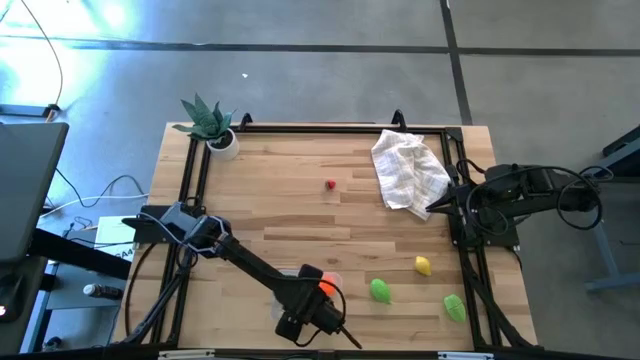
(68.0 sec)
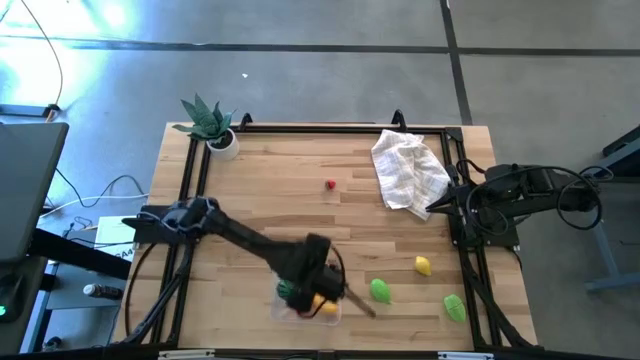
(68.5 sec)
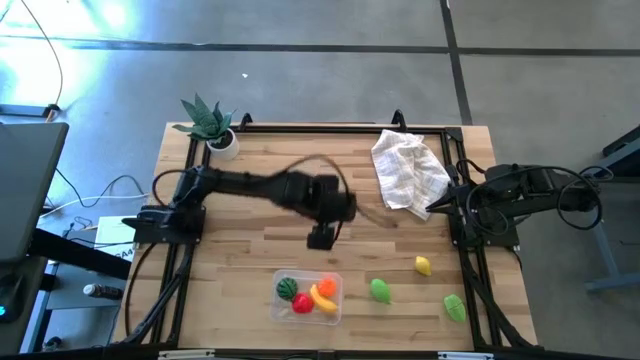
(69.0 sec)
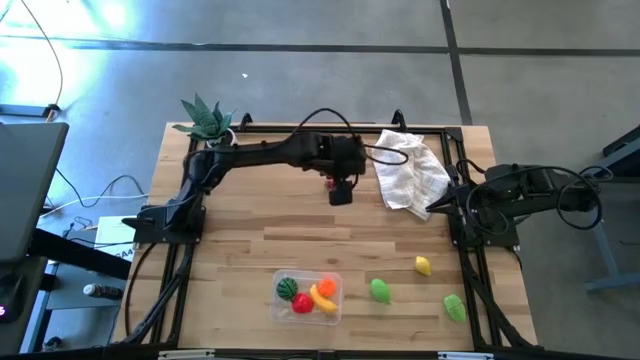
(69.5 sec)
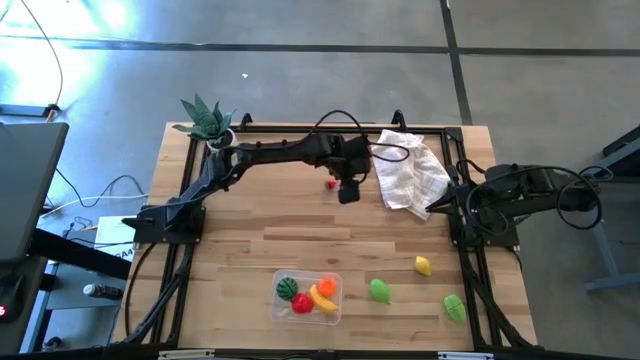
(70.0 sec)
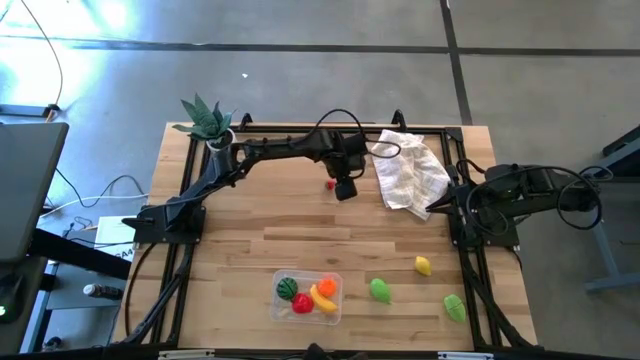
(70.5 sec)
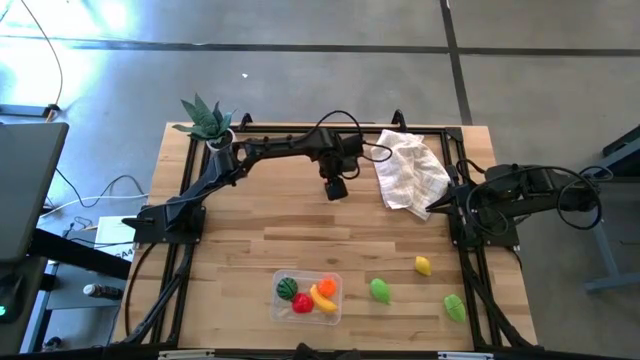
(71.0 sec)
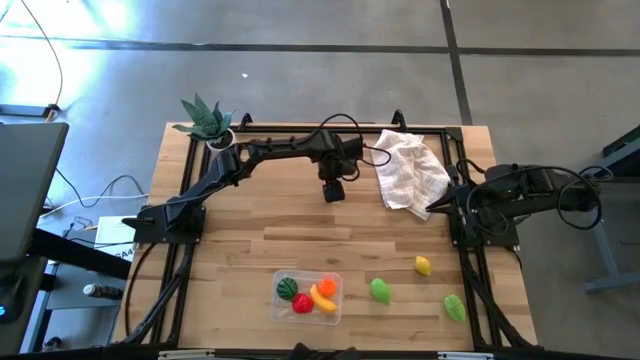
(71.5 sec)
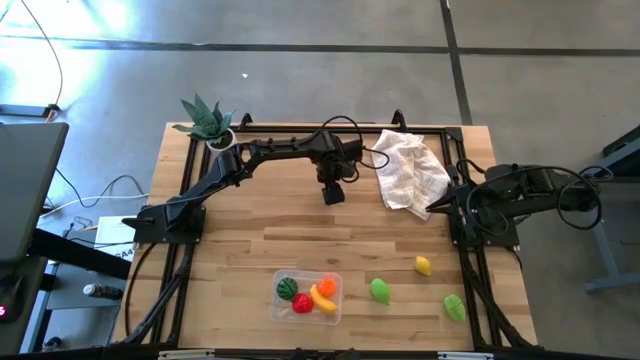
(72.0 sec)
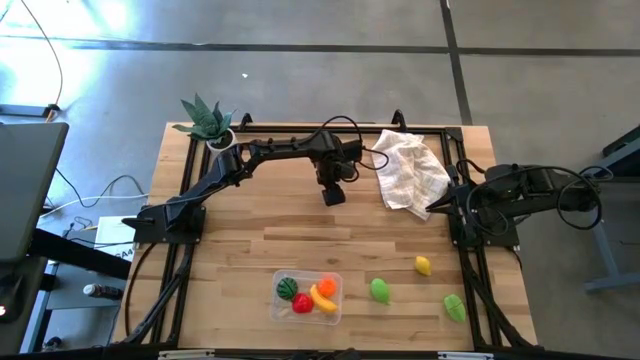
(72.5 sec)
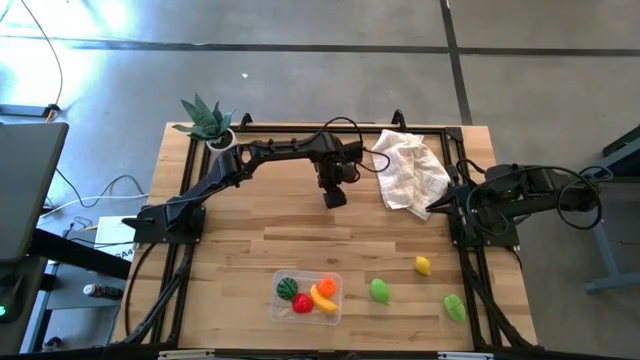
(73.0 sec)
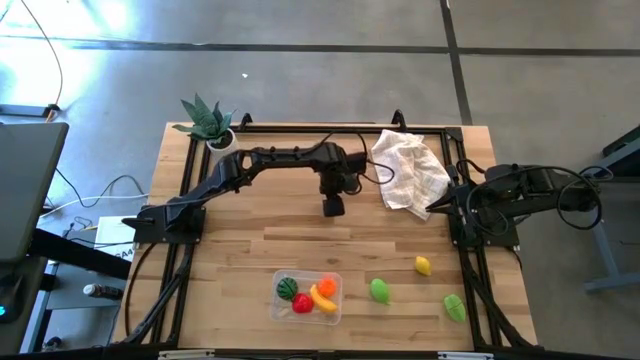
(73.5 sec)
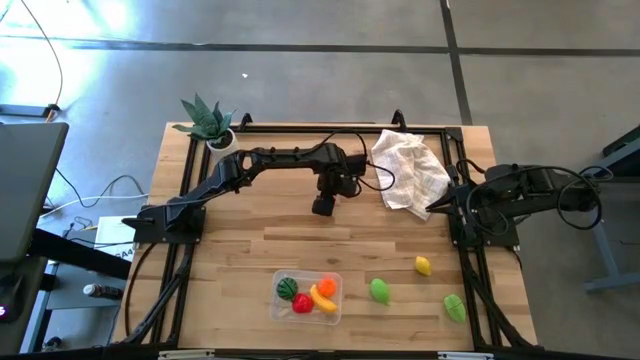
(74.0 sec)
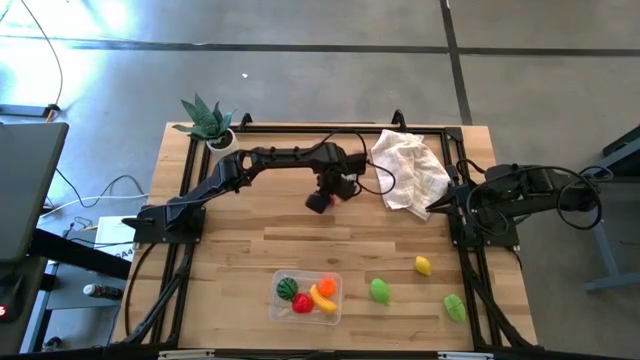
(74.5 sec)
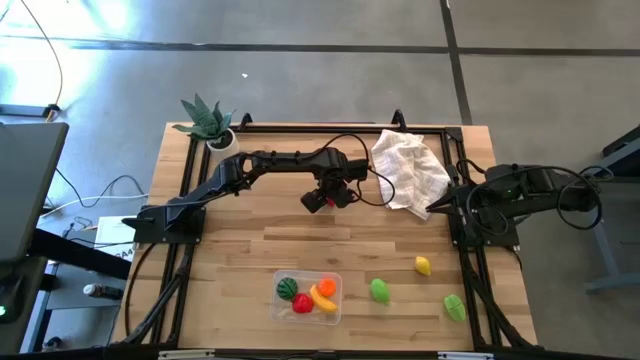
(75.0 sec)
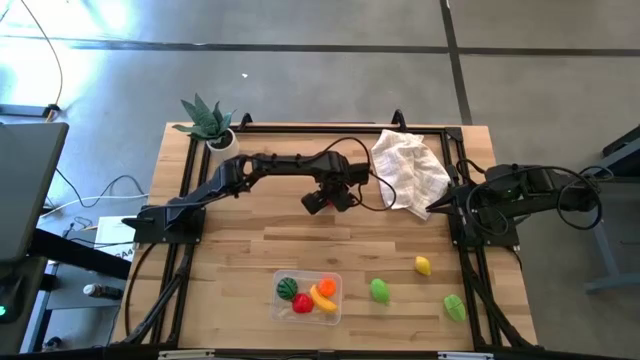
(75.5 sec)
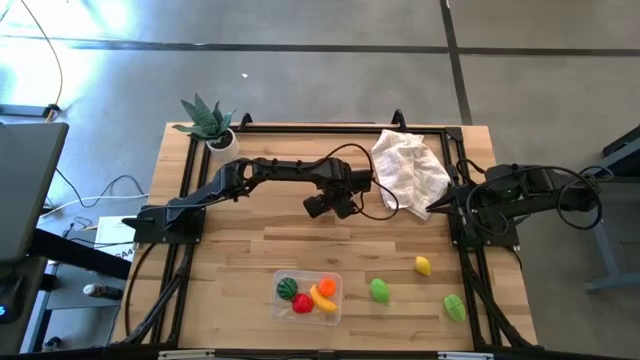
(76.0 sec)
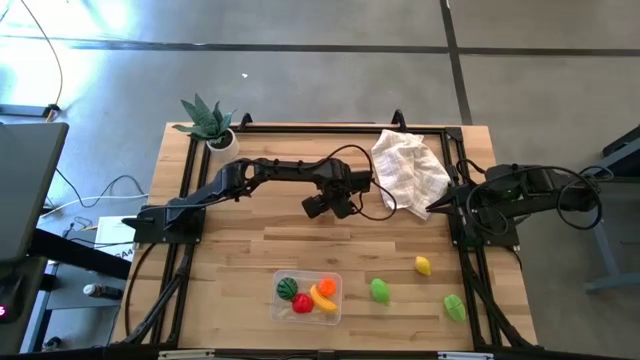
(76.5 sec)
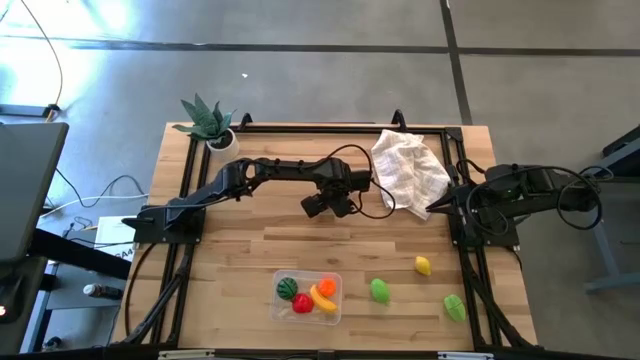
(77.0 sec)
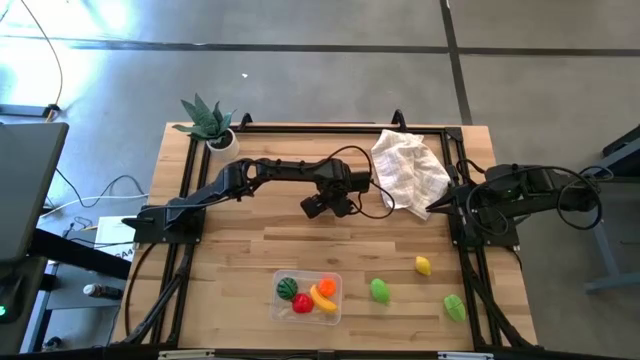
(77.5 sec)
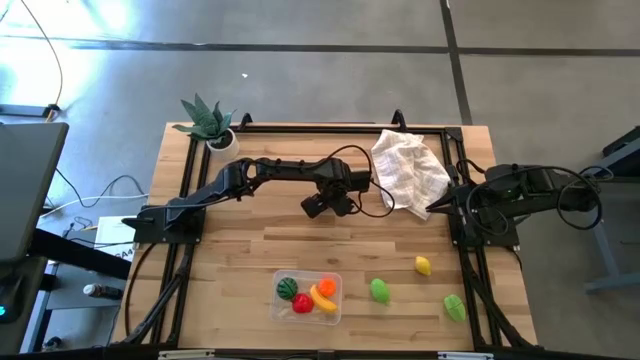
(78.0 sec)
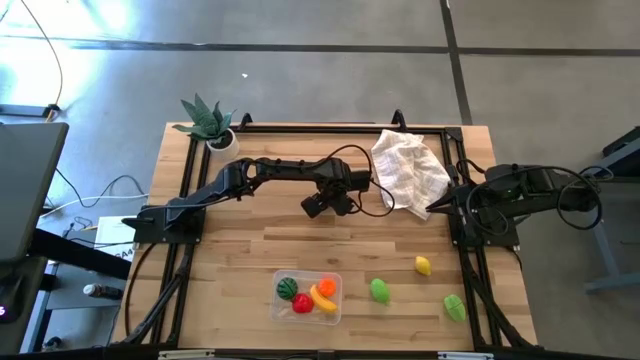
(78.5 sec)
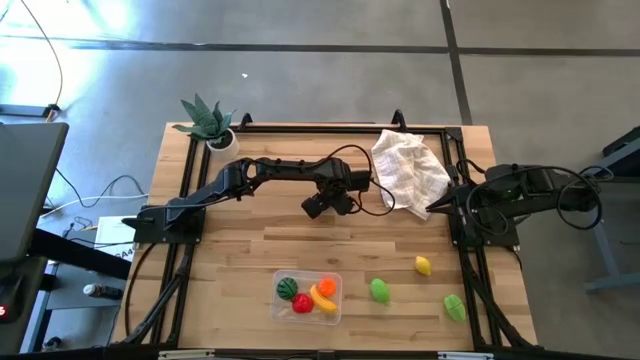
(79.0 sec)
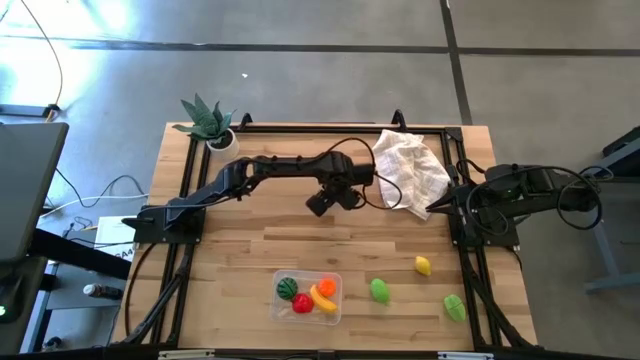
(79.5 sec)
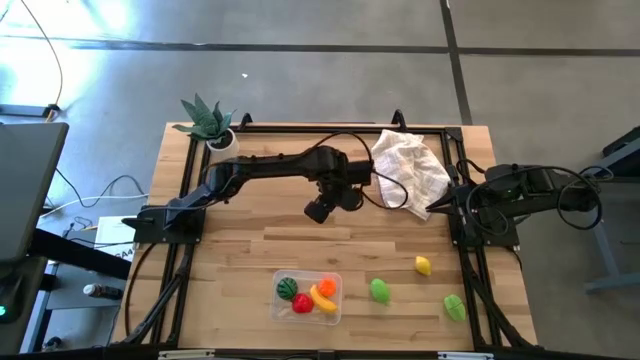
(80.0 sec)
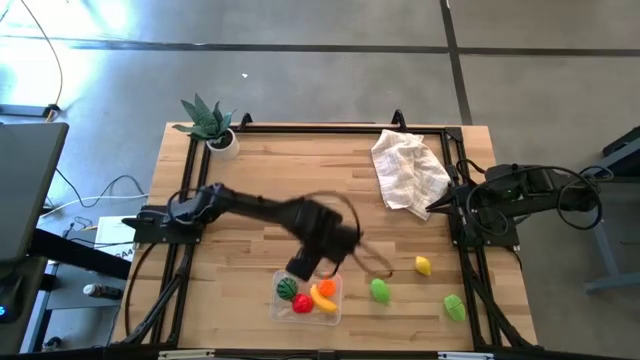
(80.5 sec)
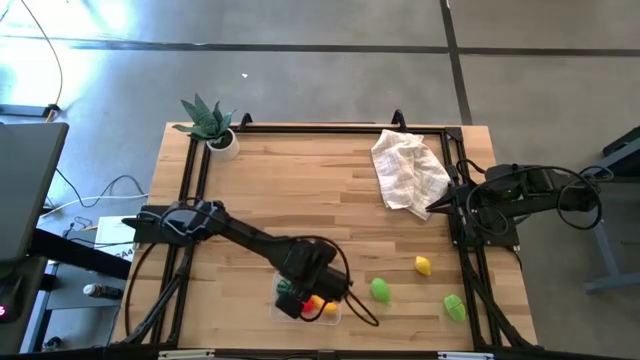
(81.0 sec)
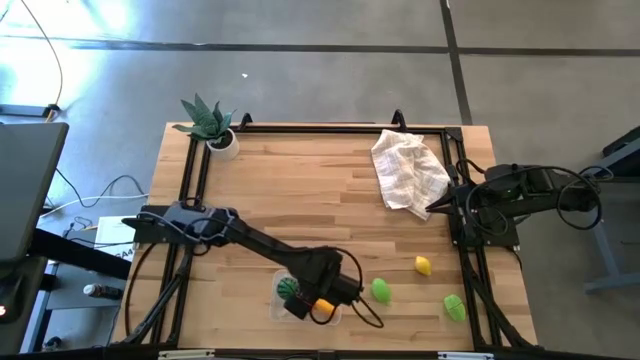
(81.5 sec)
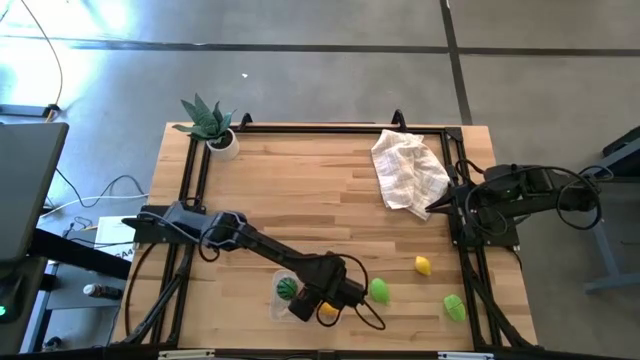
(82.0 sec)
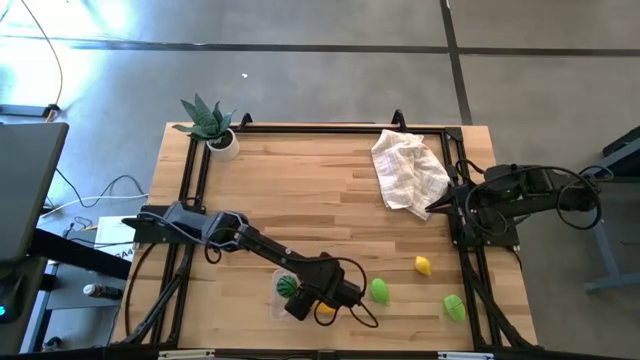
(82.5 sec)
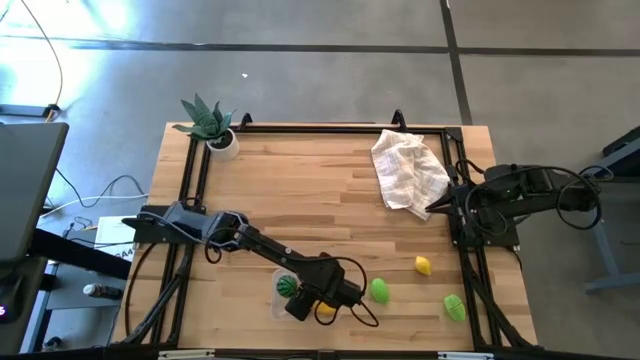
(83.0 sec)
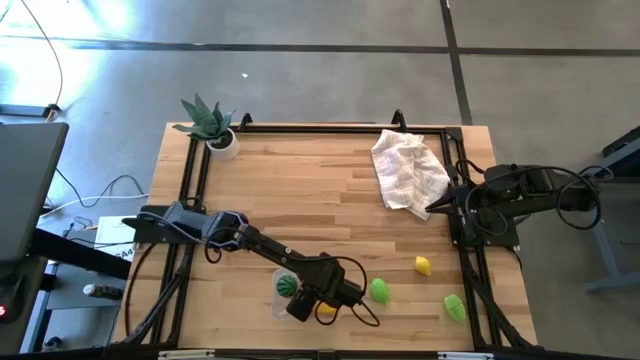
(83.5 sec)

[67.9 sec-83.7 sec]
Task: Pick and placing Produce into tupperware
Put the strawberry into the bin

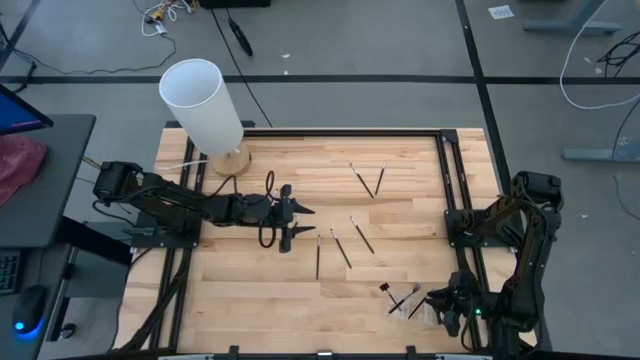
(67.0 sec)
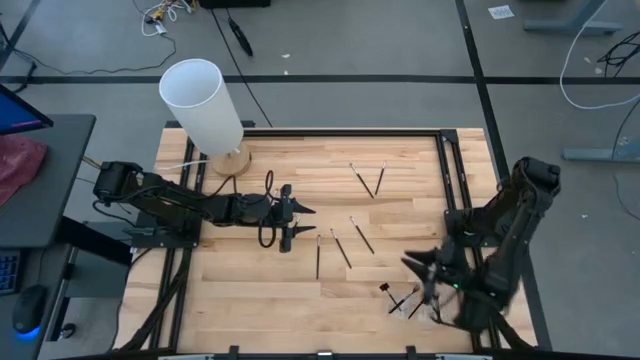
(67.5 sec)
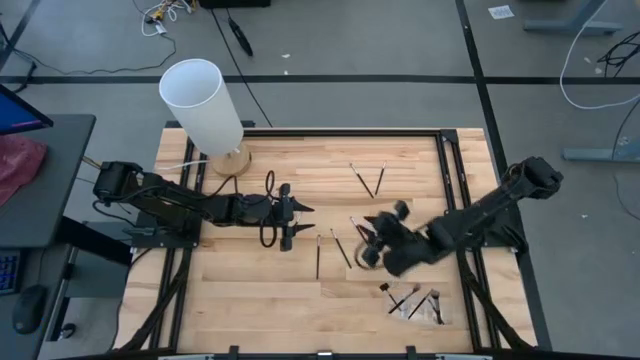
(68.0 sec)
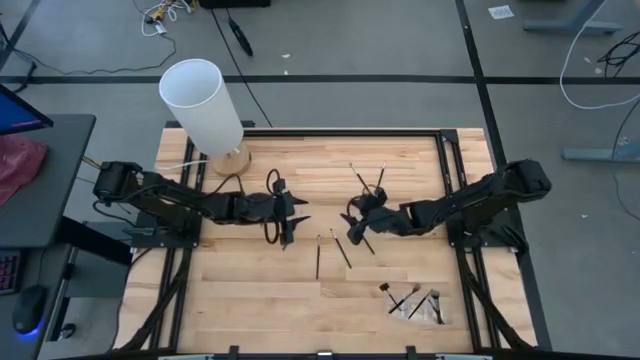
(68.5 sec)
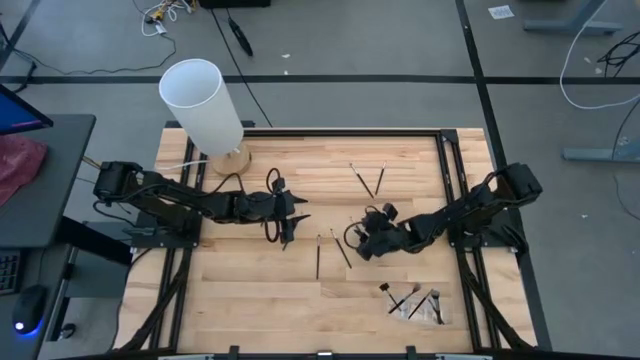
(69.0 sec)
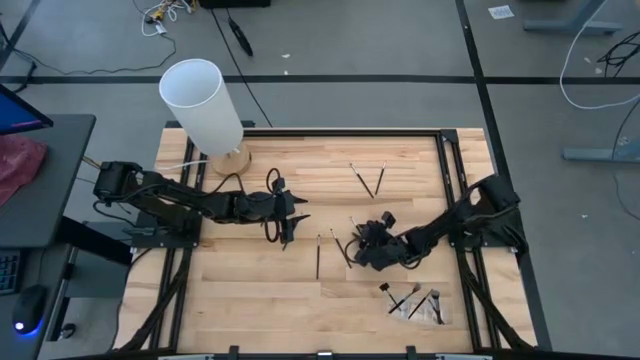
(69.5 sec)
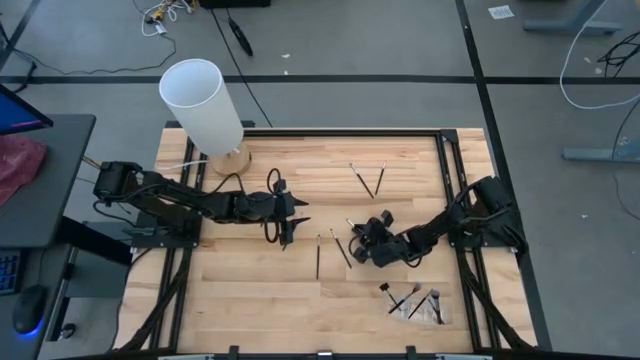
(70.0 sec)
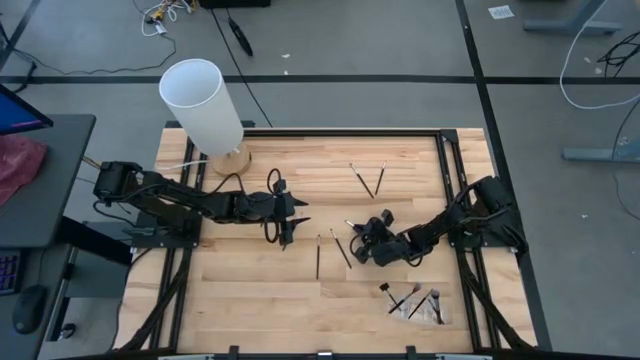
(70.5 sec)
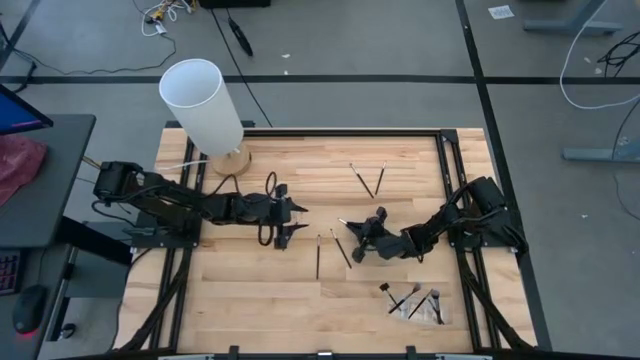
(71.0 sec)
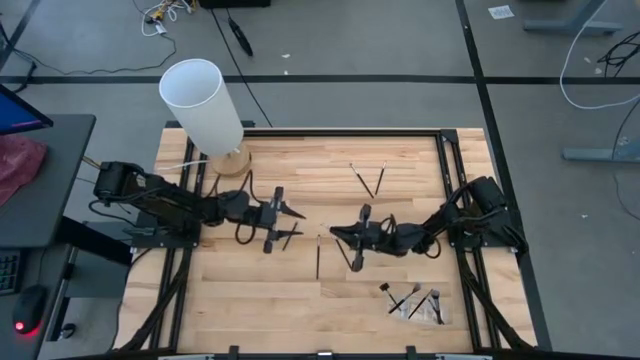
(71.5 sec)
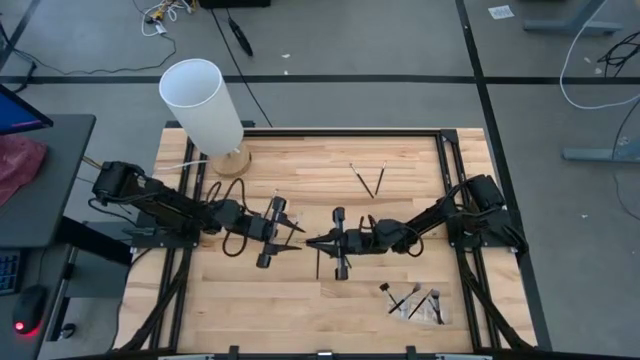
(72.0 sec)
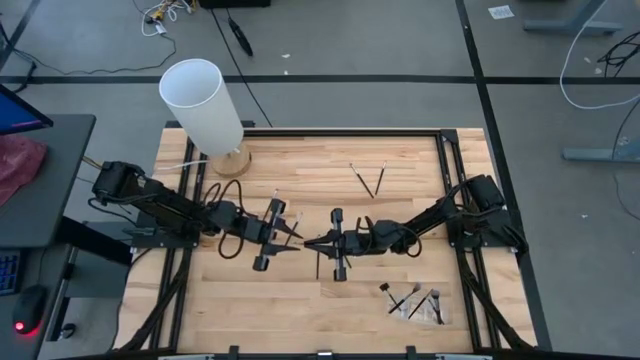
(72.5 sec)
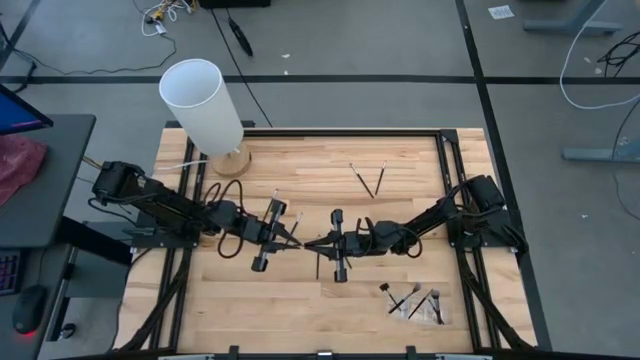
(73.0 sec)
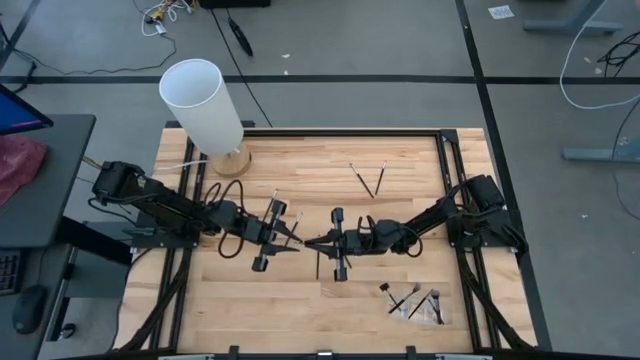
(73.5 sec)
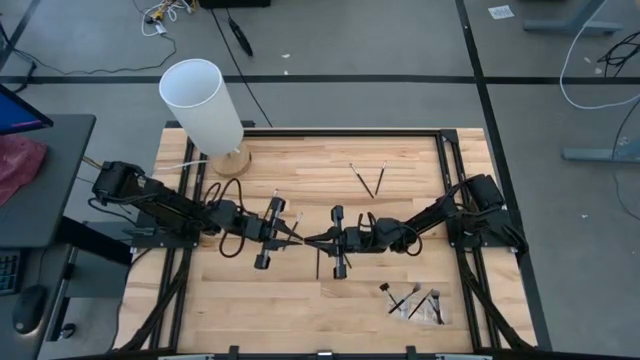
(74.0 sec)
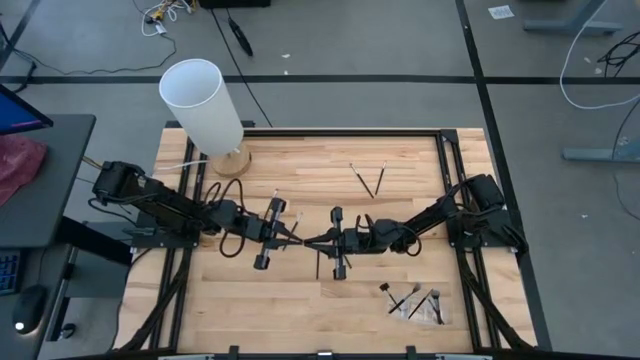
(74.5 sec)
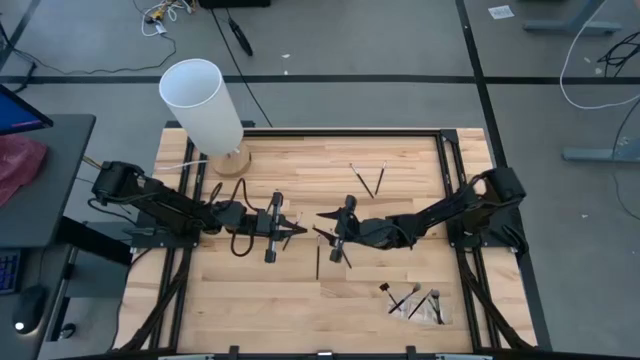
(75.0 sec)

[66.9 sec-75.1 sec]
Task: Pick & Place Makeup Supplies
Put the silver makeup brush into the transparent organizer
